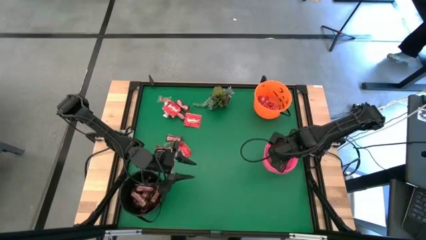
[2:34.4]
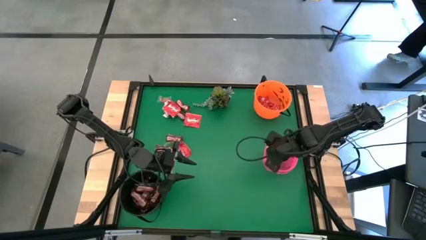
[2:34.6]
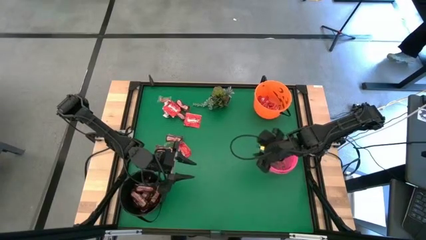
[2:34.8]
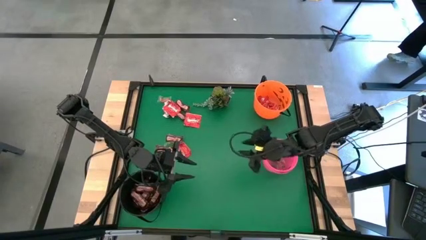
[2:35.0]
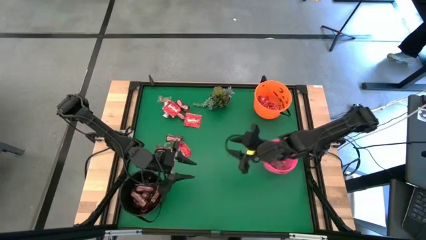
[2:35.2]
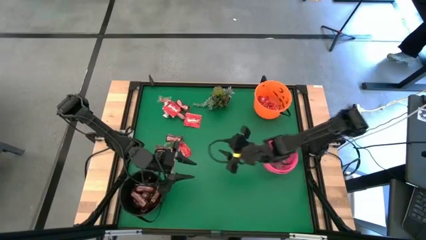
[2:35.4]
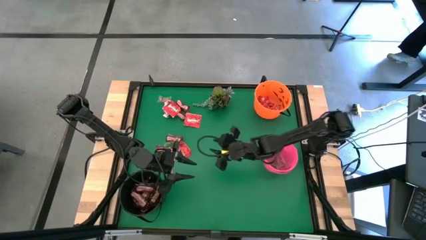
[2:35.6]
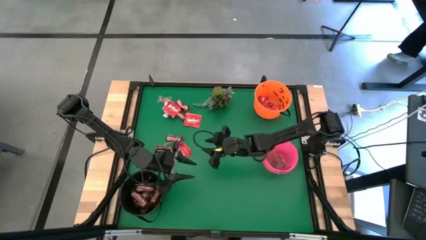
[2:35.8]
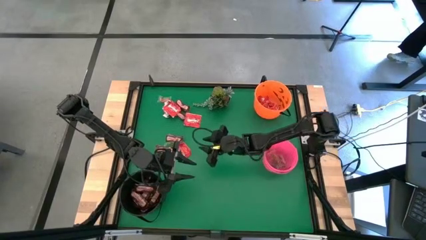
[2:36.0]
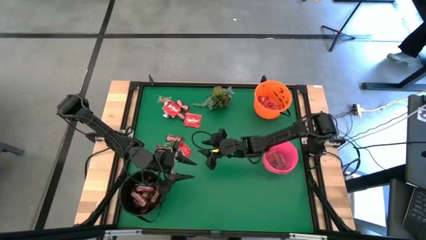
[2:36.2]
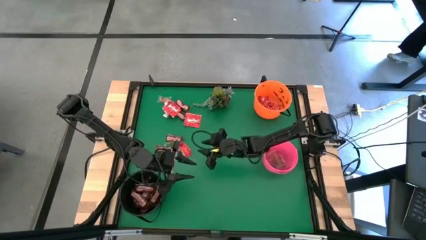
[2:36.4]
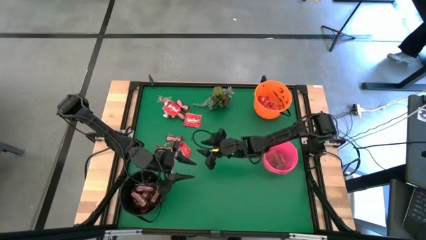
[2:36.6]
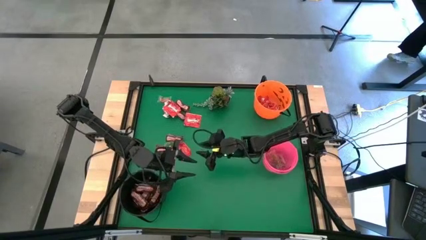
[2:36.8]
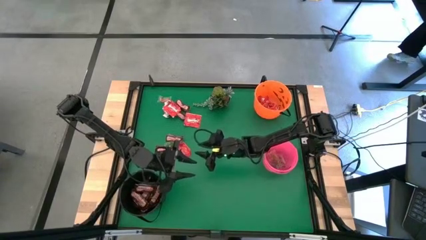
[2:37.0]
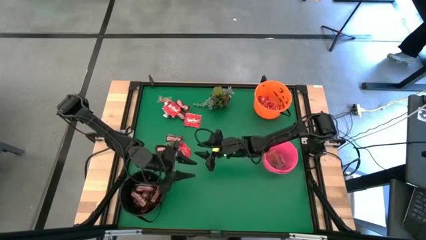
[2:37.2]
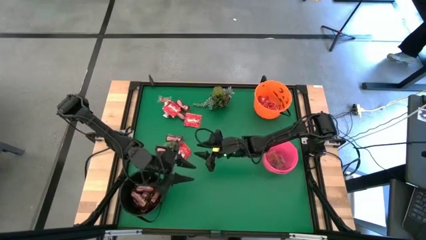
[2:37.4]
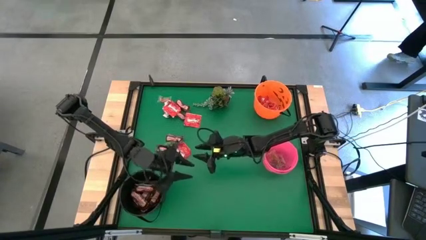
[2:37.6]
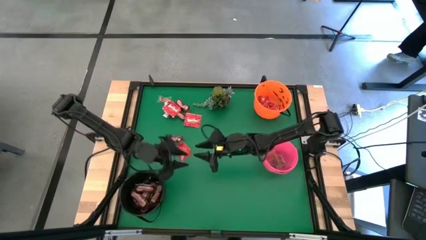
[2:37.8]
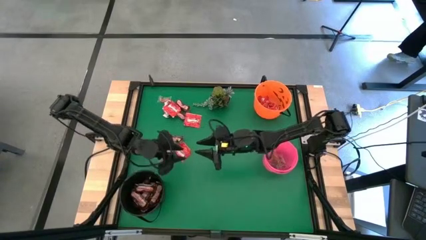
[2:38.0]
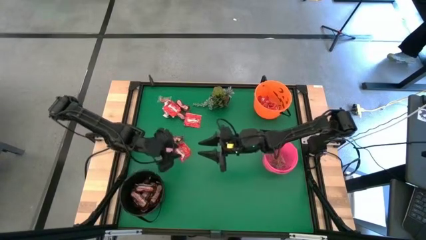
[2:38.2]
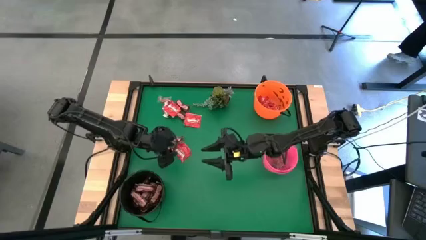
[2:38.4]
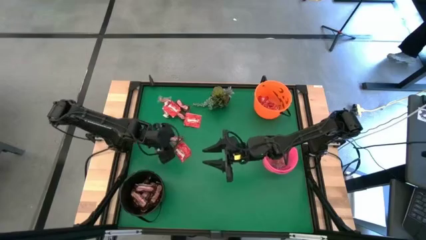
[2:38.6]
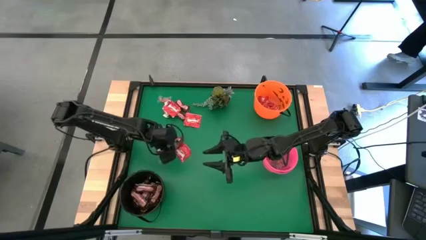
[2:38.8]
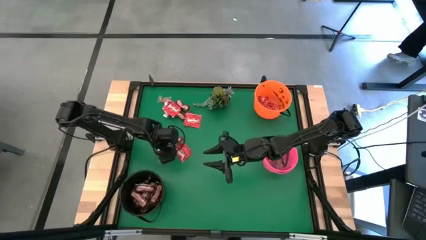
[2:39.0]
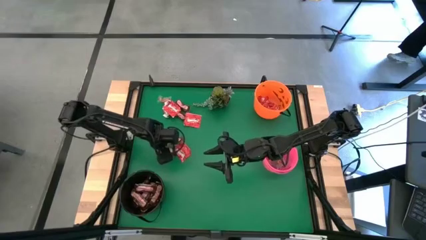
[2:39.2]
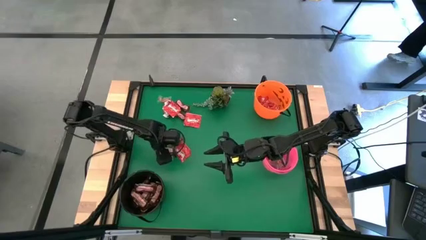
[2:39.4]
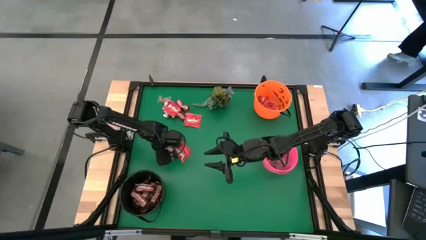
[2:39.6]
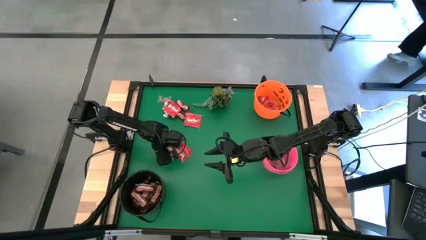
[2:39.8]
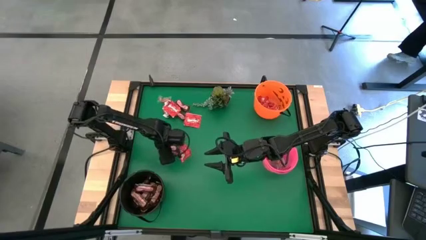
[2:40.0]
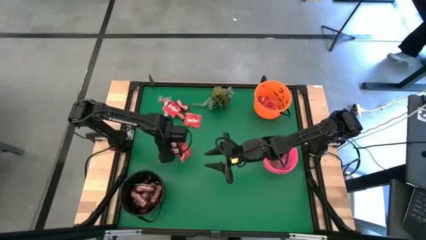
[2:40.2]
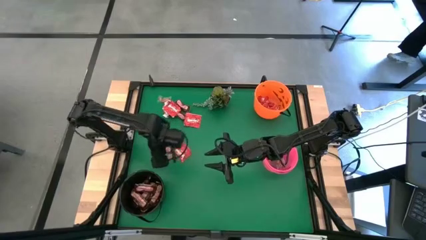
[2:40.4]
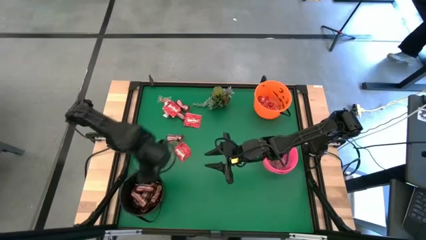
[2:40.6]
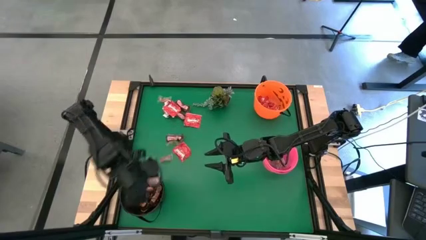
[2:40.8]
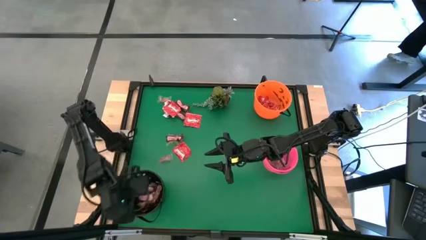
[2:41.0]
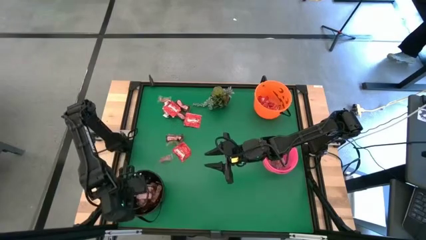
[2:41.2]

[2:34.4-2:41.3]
Task: Sort candy
Put the brown chocolate bar into the black bucket

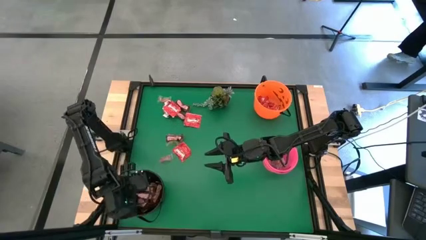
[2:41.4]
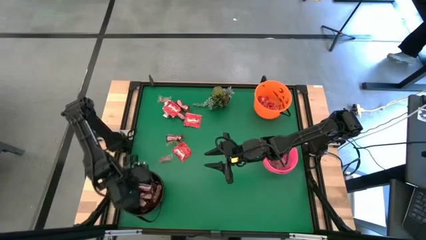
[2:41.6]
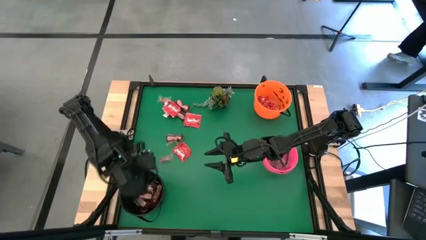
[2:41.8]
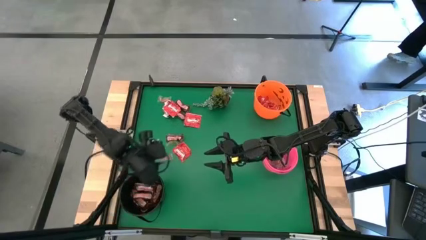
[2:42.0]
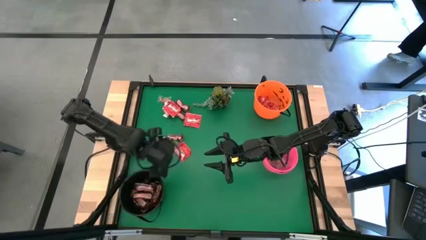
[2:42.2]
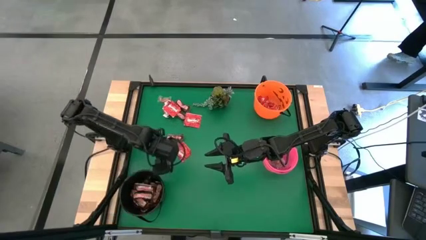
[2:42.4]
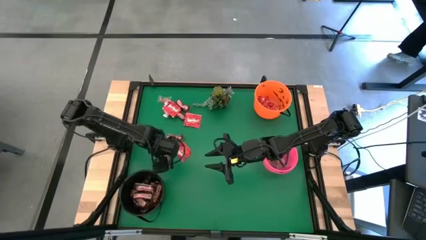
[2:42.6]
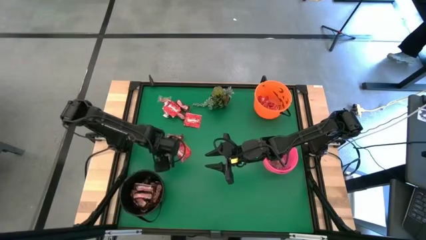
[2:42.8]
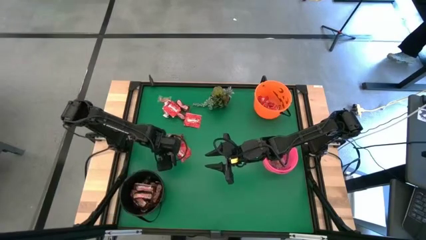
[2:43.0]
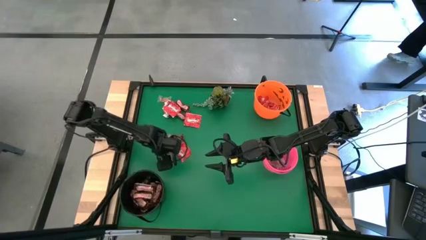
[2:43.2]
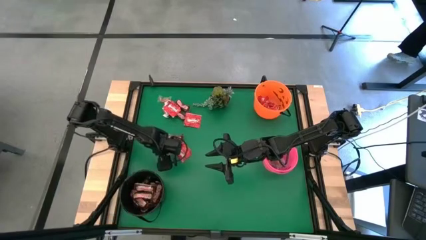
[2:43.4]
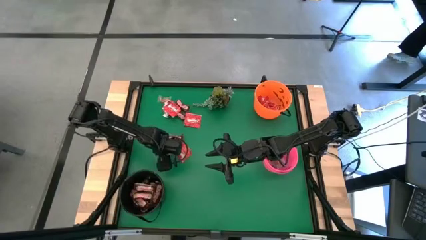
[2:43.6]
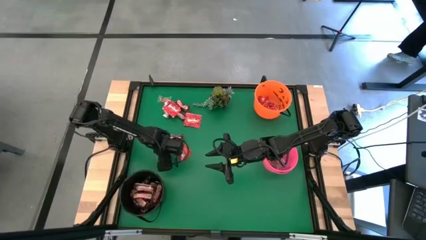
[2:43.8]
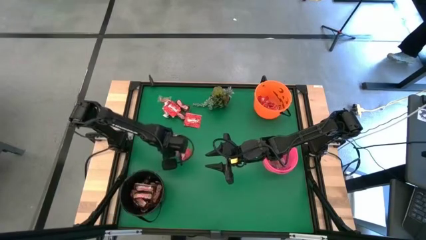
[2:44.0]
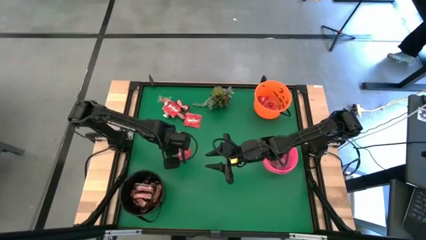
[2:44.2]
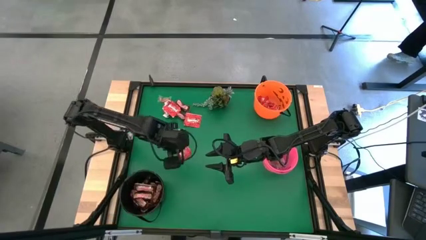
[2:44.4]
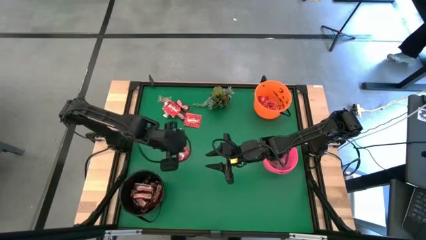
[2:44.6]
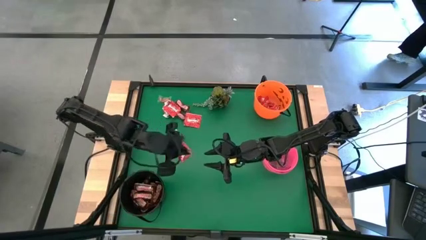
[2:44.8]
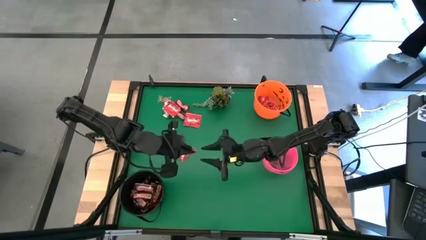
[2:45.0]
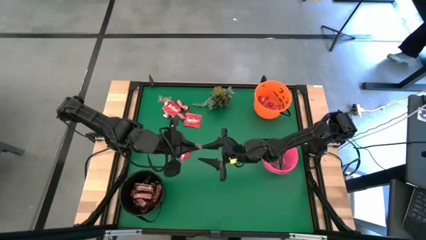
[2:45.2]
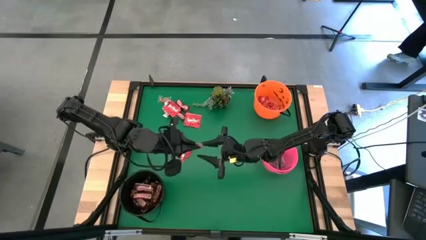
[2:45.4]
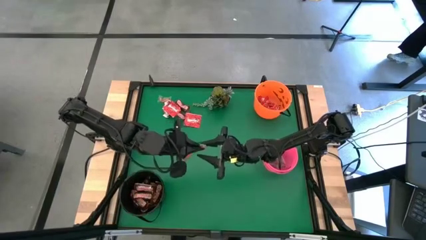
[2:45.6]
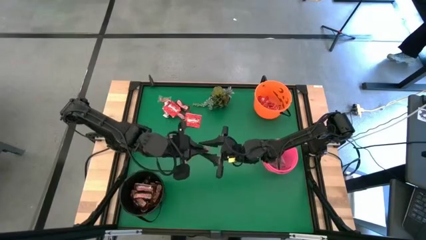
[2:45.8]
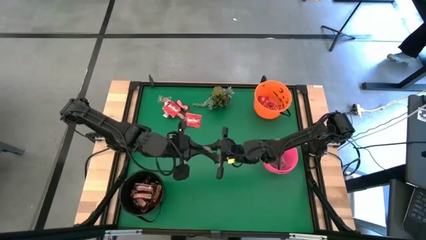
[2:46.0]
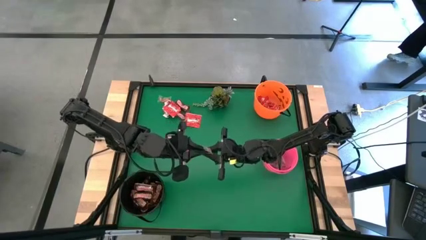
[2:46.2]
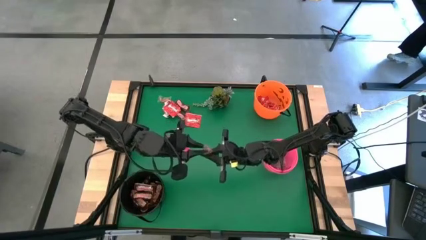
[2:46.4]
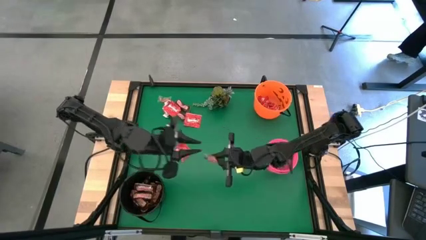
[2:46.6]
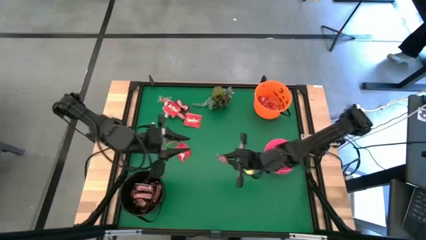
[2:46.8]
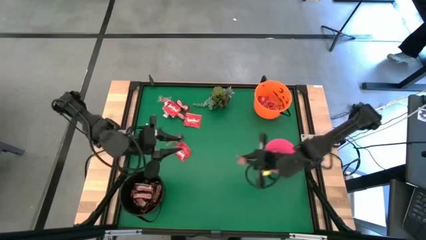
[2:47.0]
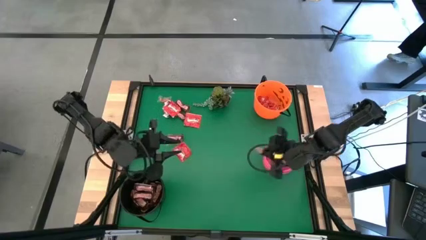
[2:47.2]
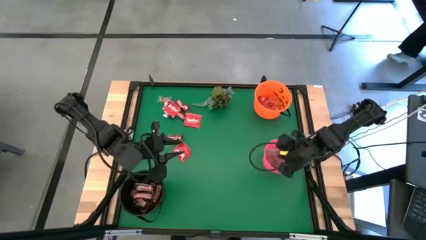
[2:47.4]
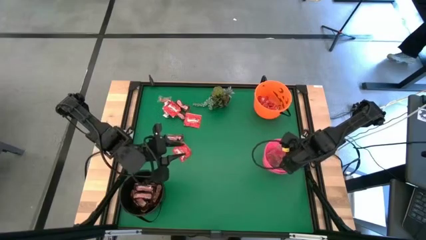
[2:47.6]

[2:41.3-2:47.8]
Put the orange candy into the pink bucket

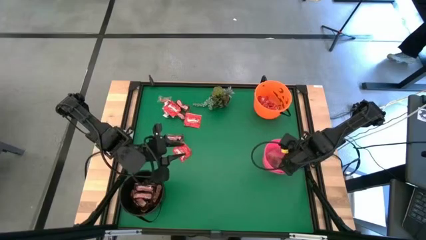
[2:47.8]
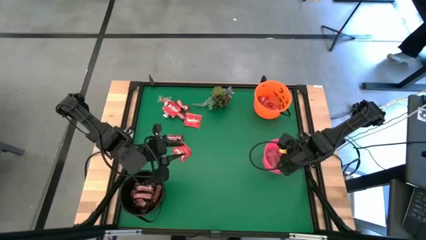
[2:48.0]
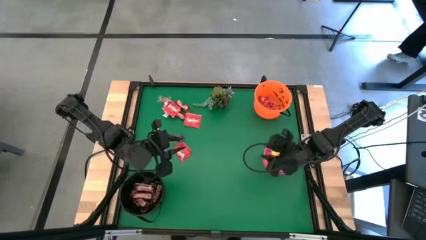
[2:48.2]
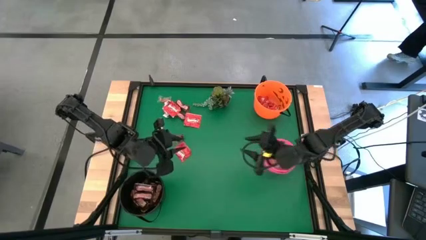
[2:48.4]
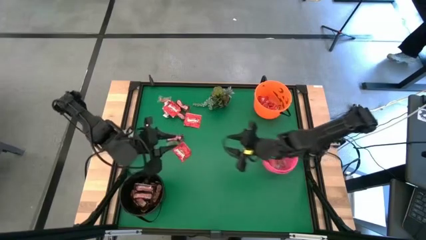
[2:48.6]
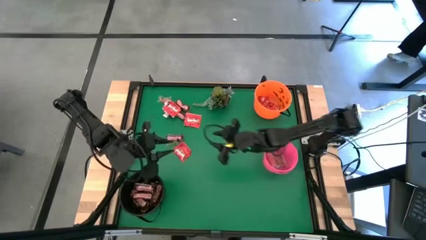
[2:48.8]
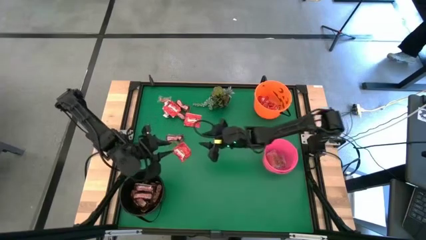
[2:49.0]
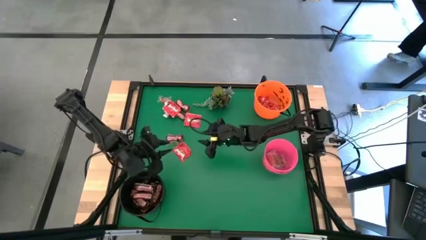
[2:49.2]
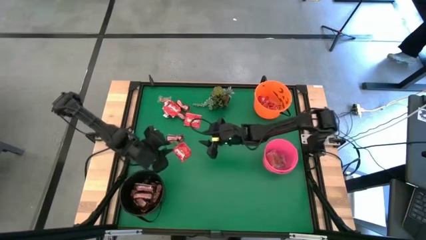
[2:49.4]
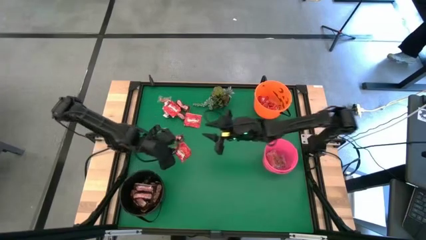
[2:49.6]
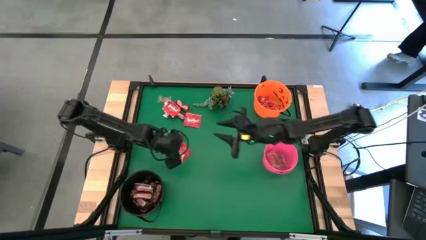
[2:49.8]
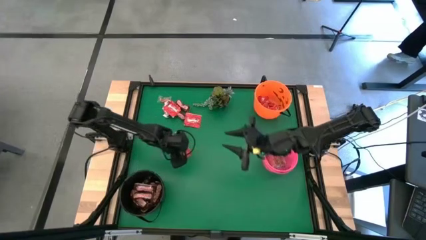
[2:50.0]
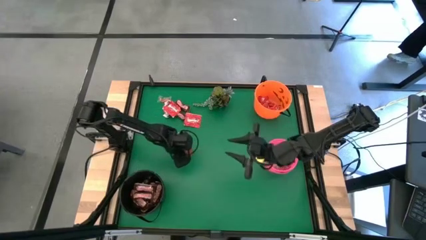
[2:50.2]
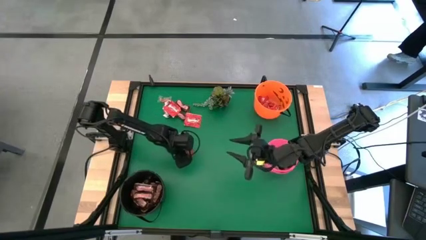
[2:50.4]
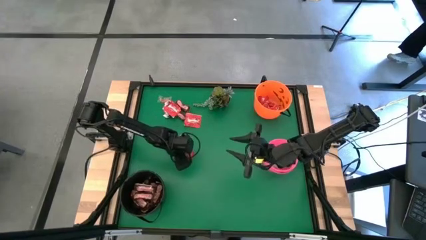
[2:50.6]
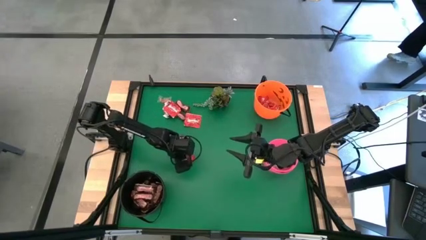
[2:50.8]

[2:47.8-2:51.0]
Put the red candy into the orange bucket

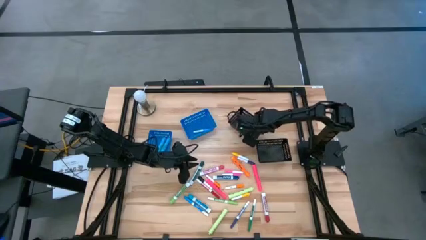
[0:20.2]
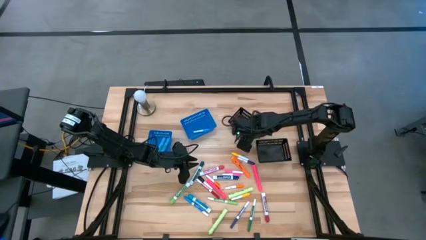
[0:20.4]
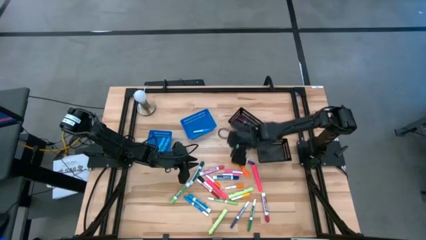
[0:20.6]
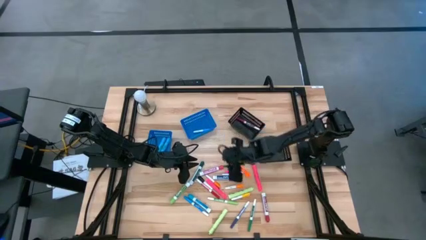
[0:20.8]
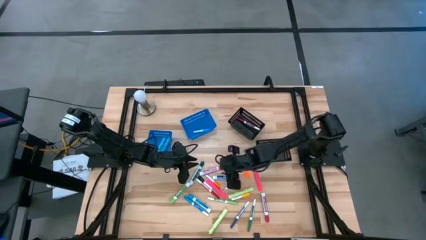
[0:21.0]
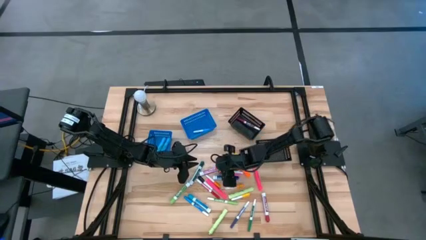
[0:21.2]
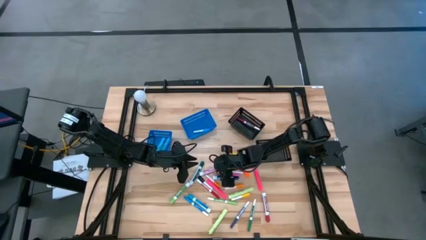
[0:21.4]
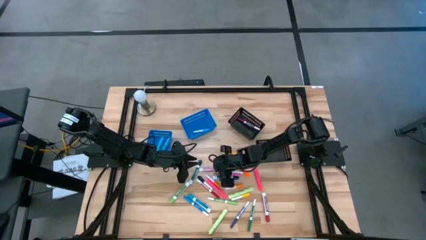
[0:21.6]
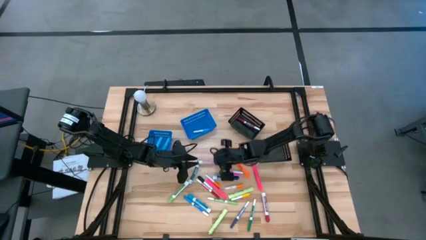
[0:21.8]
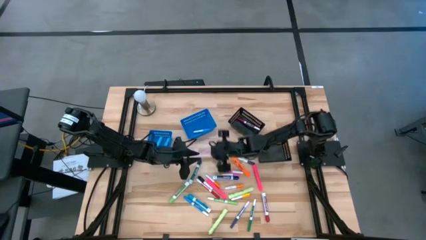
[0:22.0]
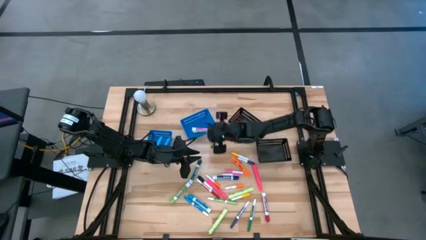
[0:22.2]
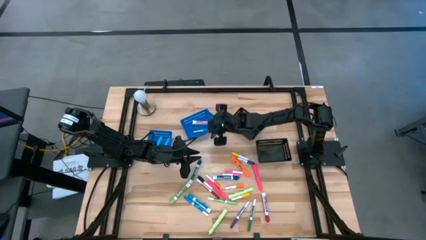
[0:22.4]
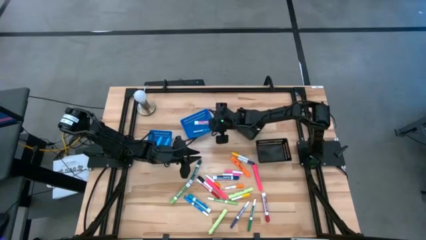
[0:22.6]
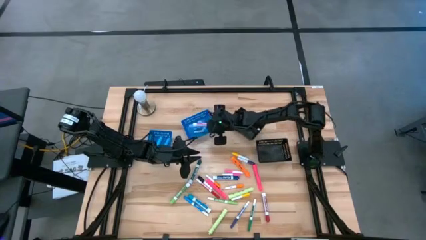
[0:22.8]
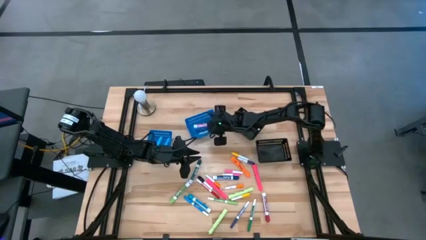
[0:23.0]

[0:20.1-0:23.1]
Task: Pick & Place Markers
Put the pink marker pen into the top black bin
